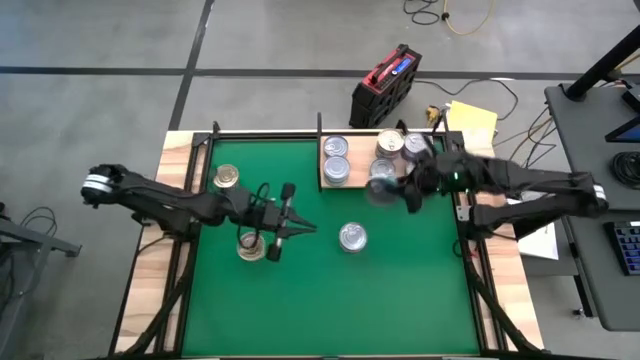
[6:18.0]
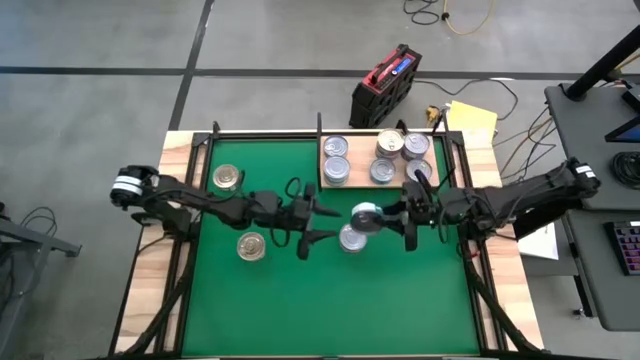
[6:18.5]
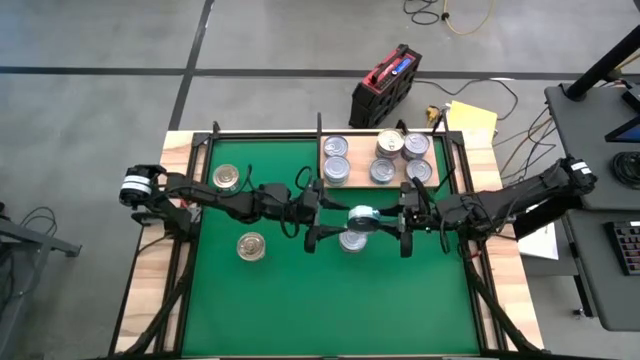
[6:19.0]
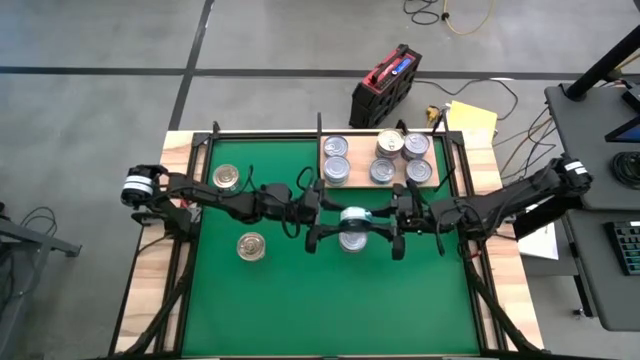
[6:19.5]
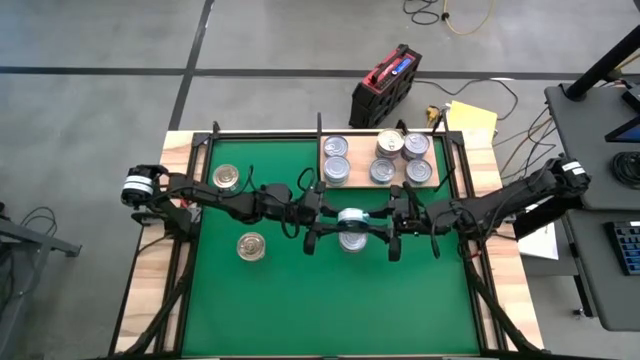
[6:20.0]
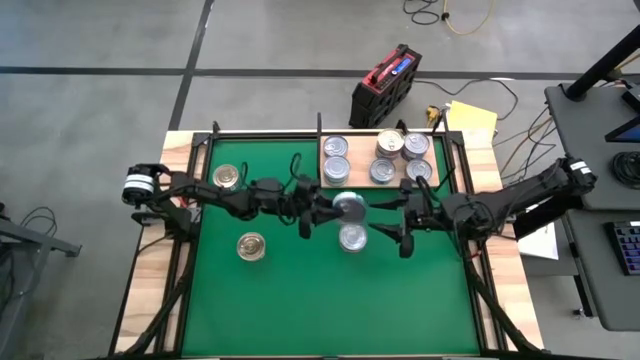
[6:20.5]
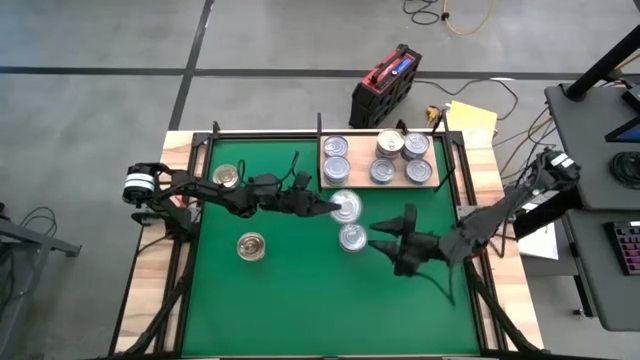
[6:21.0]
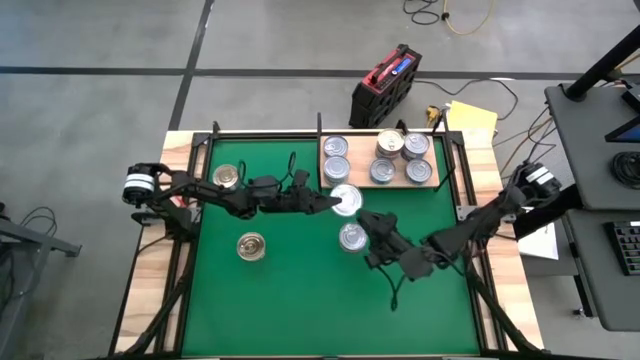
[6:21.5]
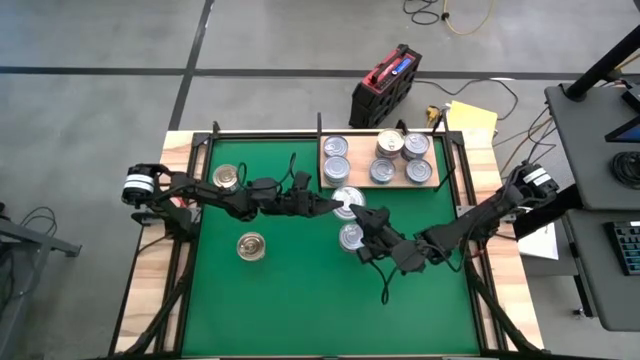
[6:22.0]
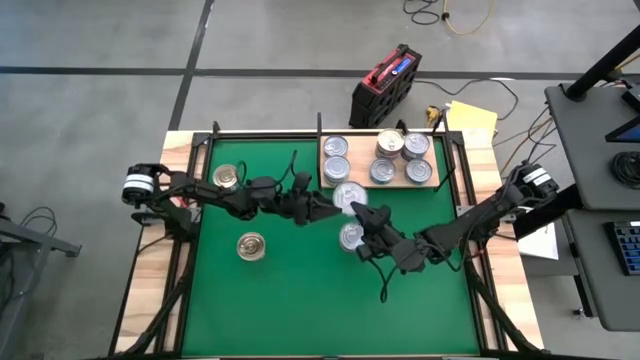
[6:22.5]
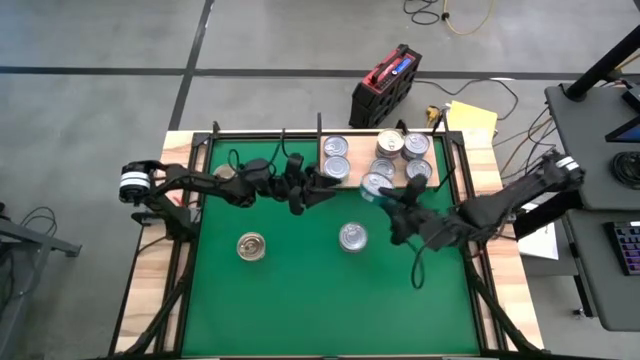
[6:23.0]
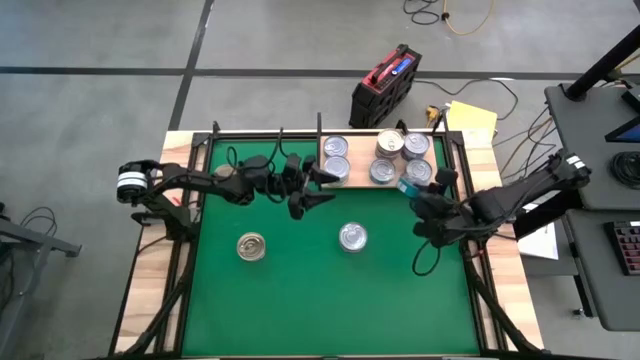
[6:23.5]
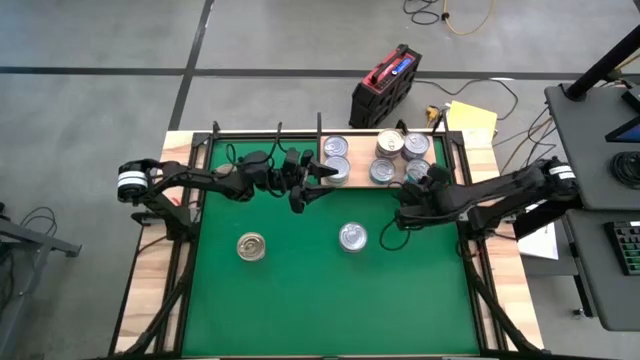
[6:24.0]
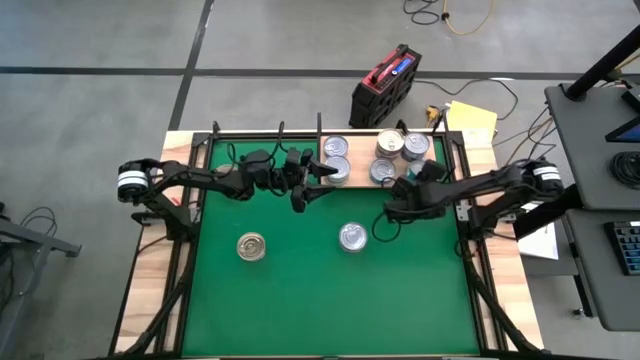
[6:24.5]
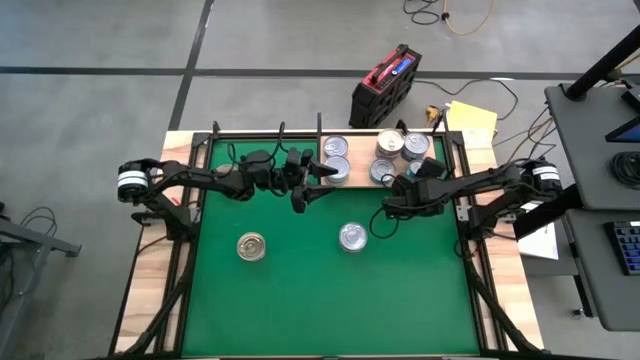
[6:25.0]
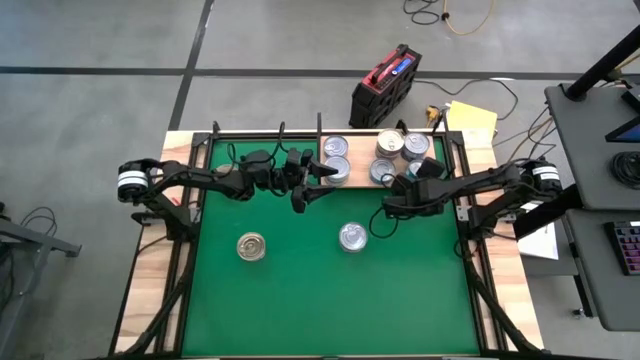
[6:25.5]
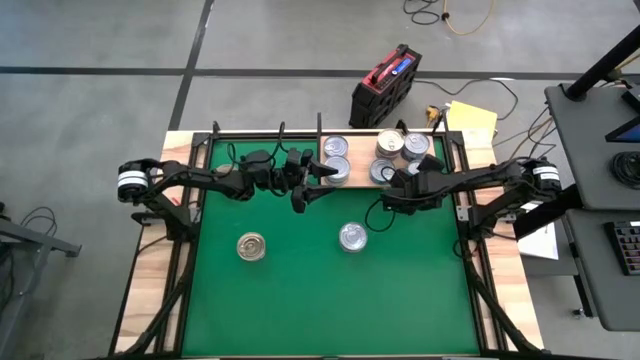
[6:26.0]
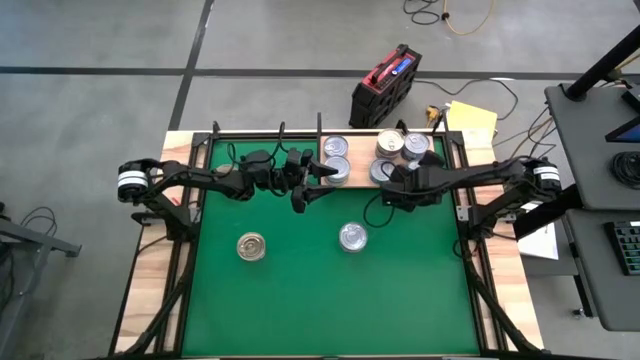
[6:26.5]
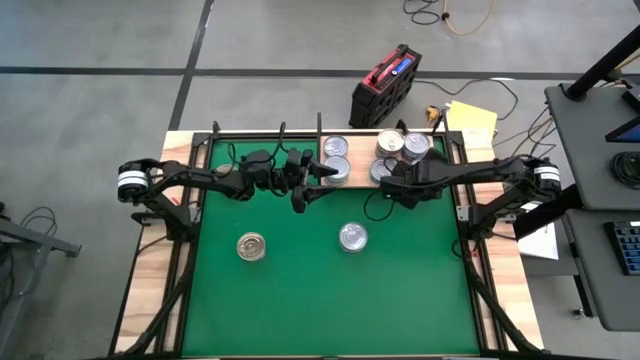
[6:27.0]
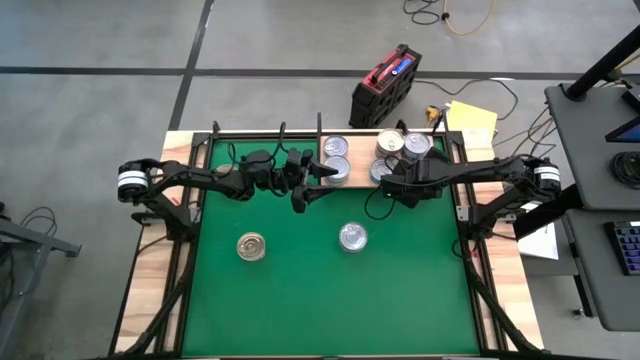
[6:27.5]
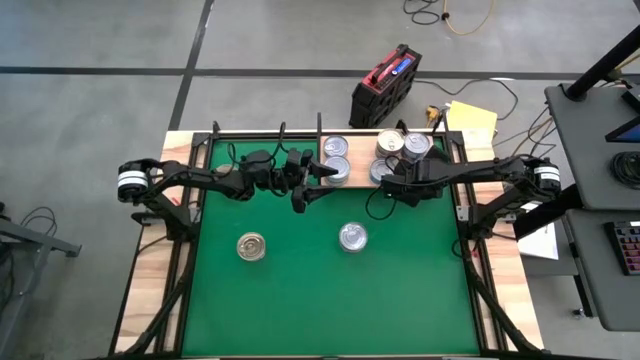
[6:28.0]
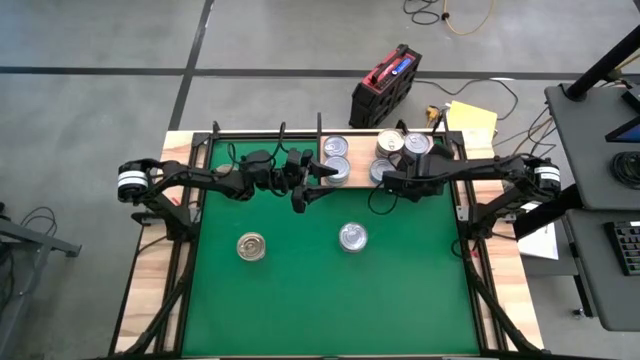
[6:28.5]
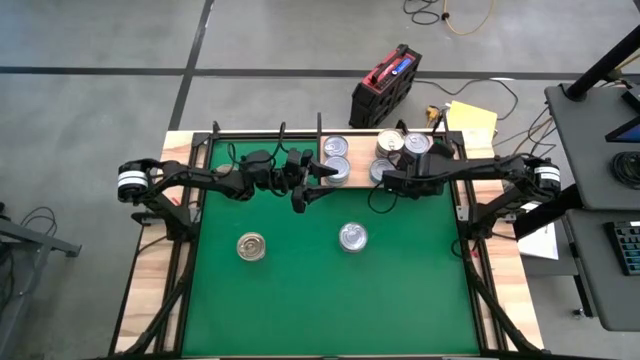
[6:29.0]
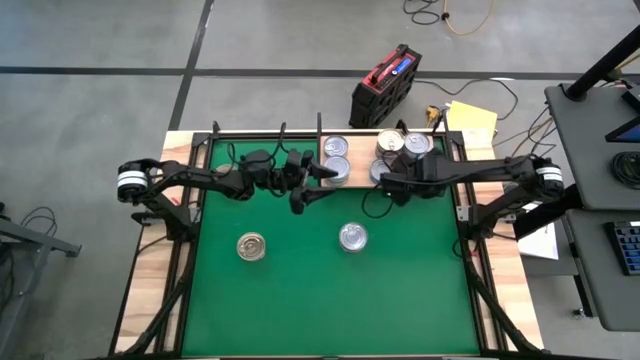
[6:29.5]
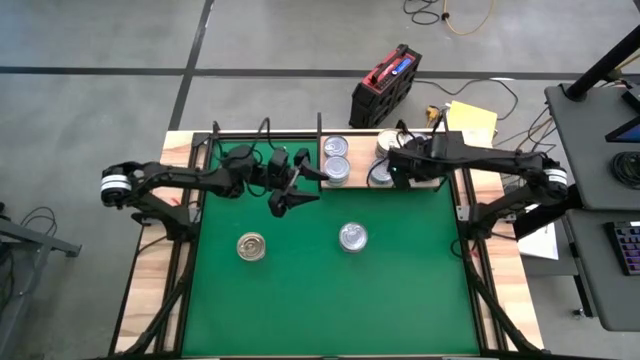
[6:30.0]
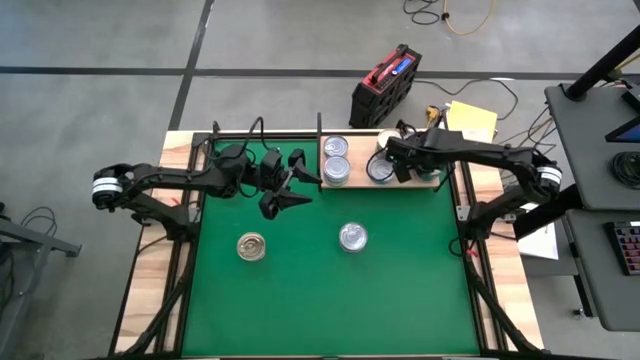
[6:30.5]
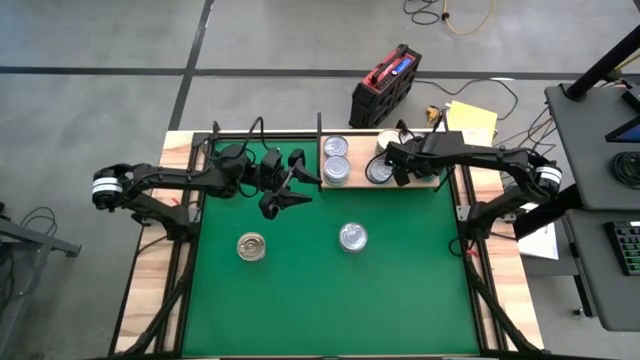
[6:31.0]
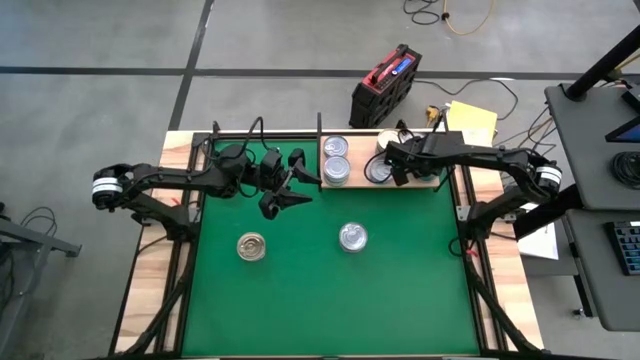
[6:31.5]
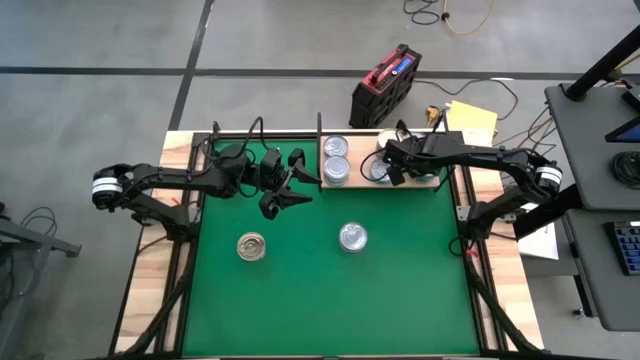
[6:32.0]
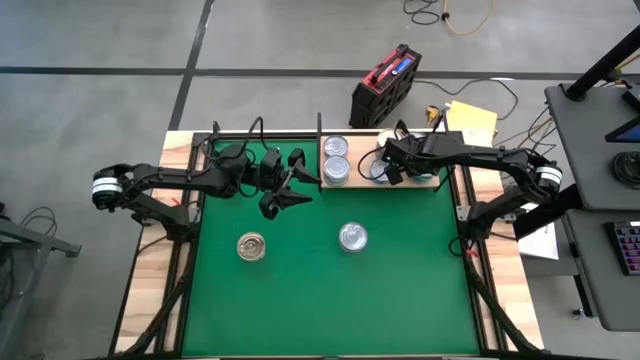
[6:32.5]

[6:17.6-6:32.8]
Task: Stack canned seafood by type on shelf
Stack the green/blue tuna can on top of the green/blue tuna can on the shelf

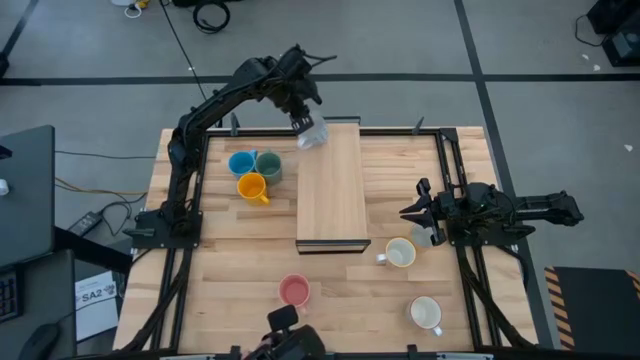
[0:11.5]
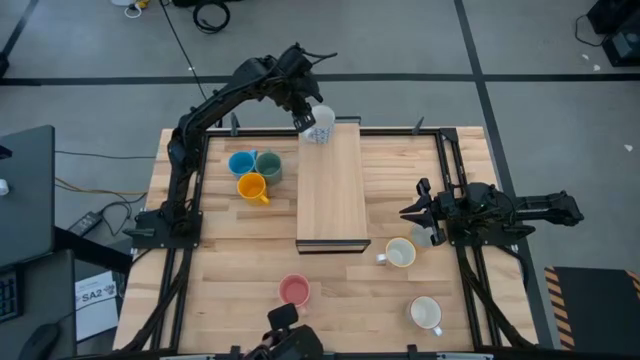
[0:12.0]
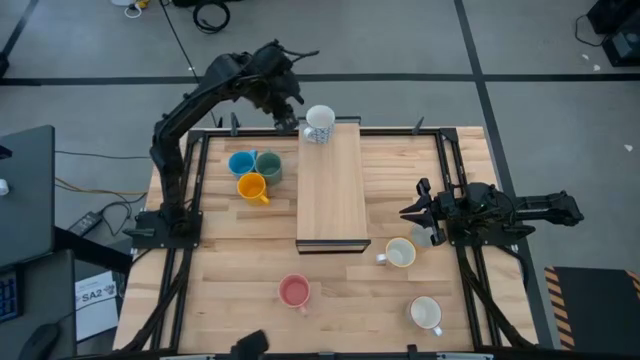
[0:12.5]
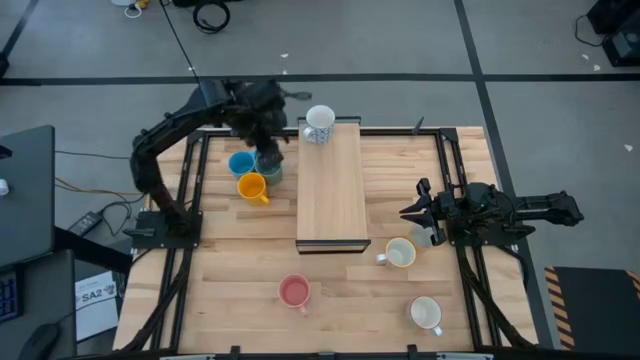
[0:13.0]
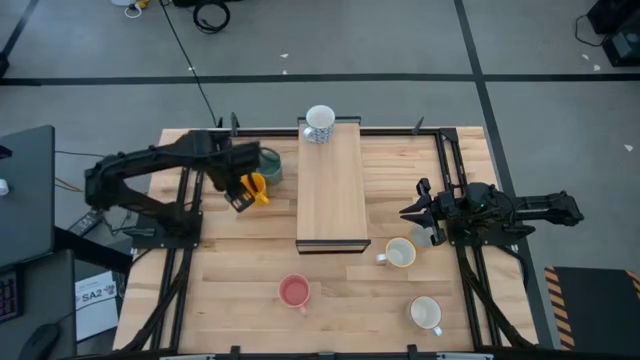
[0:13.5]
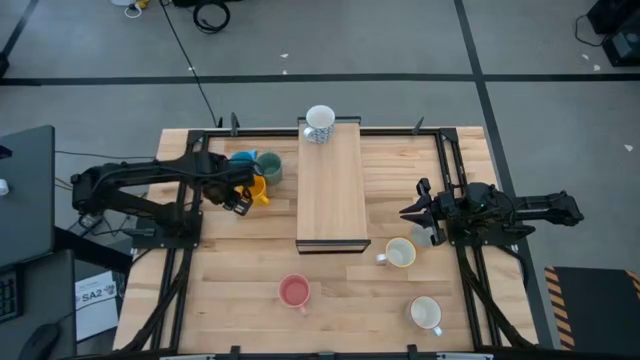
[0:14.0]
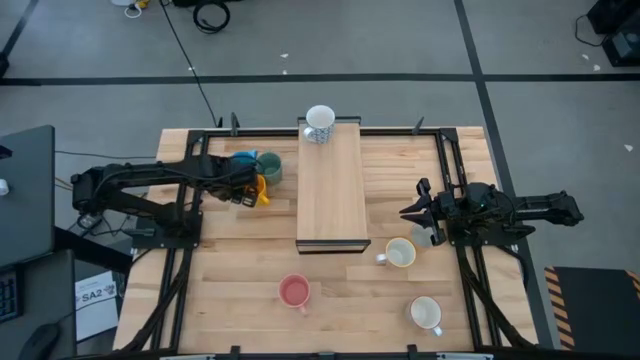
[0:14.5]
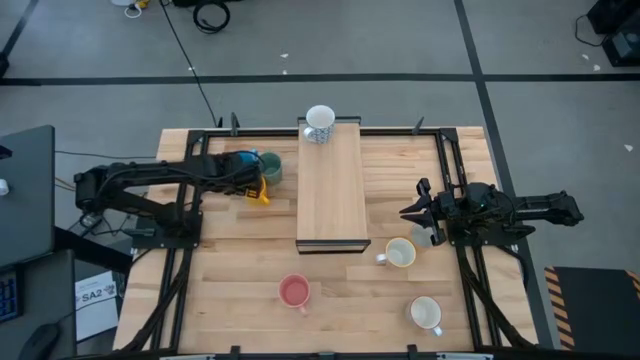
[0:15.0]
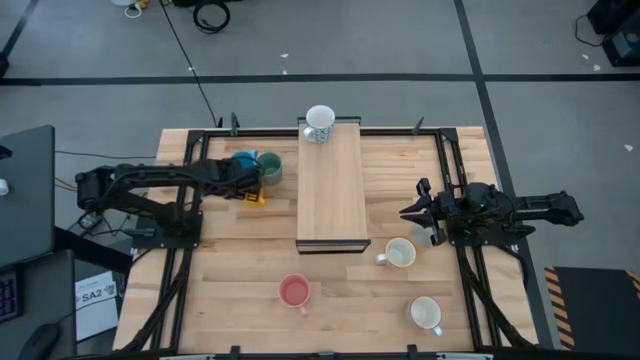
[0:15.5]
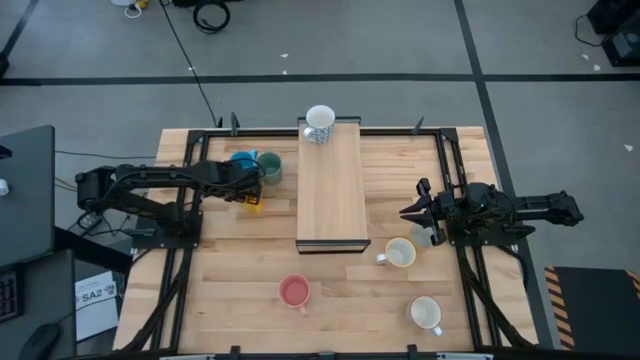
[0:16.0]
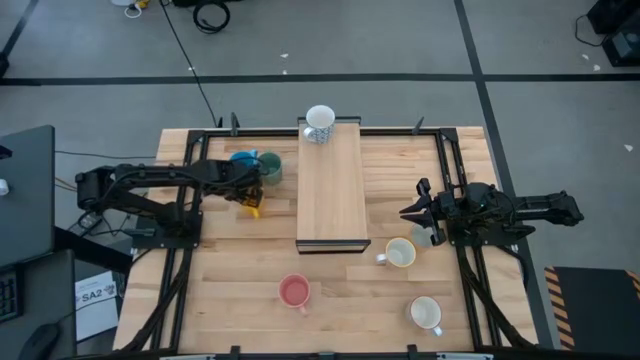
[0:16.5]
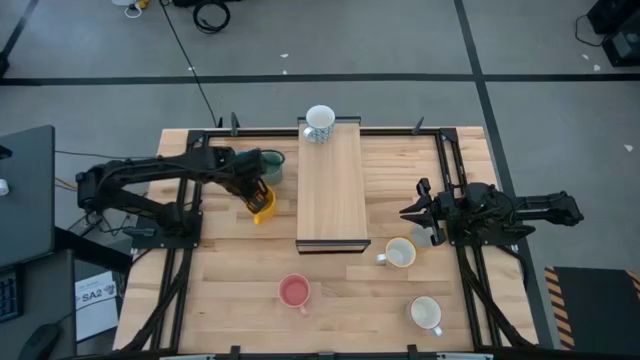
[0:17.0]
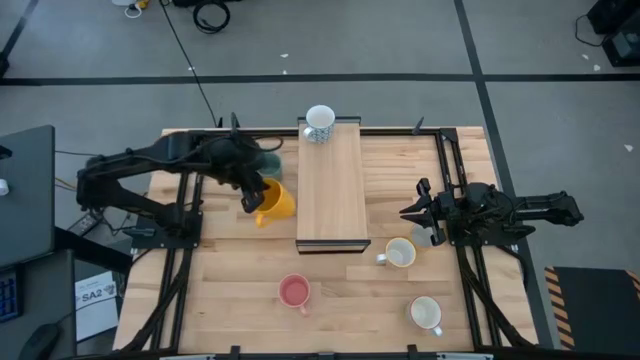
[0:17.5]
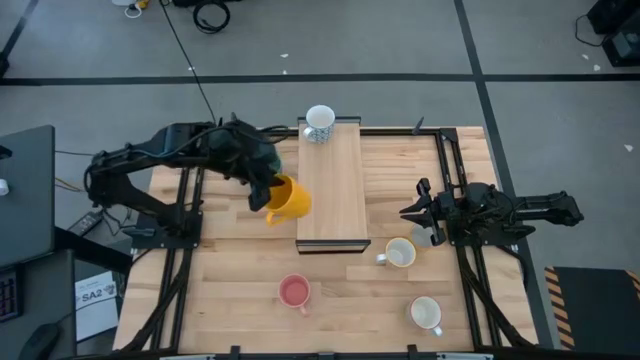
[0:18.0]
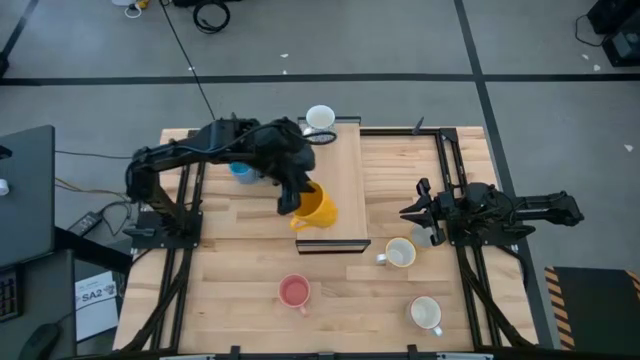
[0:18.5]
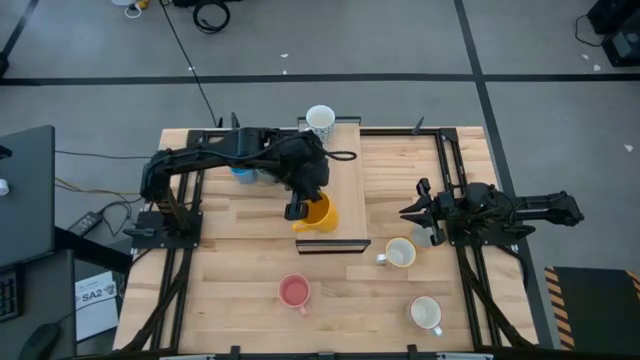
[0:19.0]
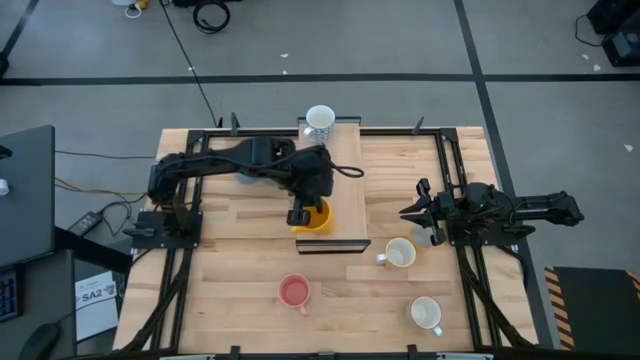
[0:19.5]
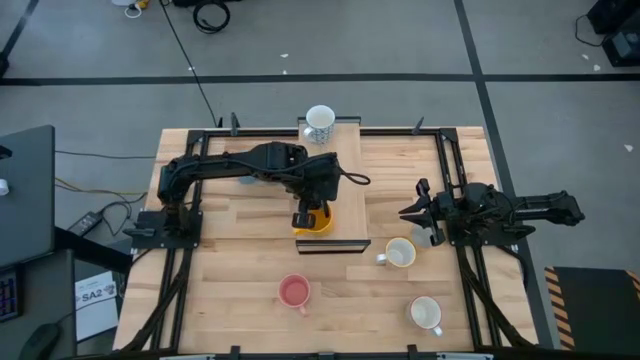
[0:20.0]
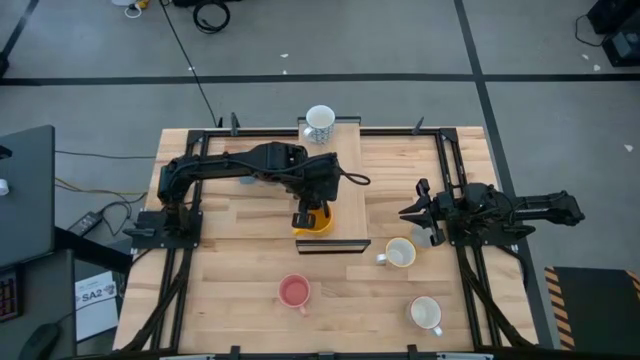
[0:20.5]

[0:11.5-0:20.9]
Task: Place coffee mugs
Put the yellow mug on the shelf
